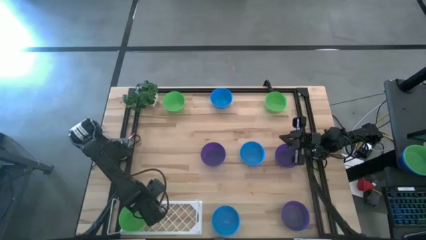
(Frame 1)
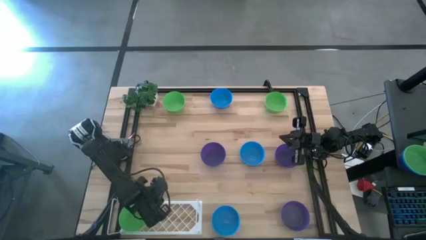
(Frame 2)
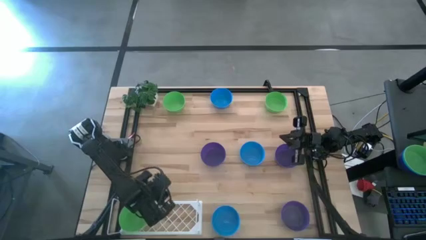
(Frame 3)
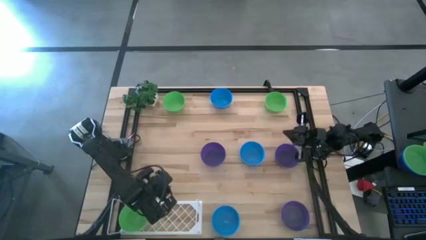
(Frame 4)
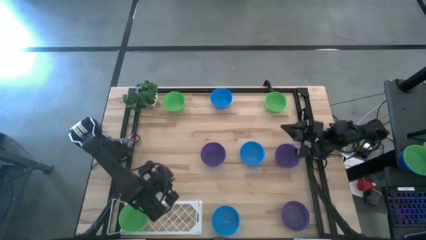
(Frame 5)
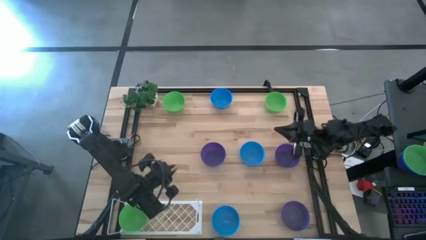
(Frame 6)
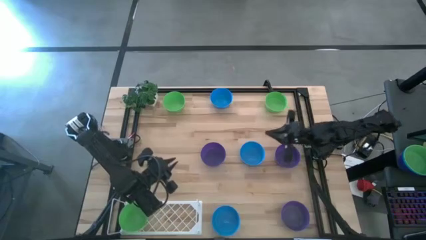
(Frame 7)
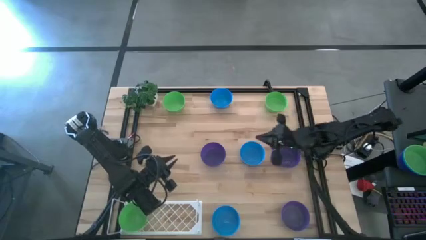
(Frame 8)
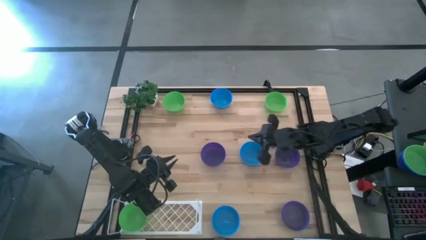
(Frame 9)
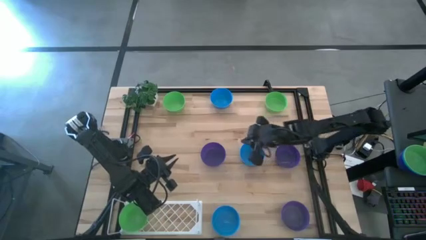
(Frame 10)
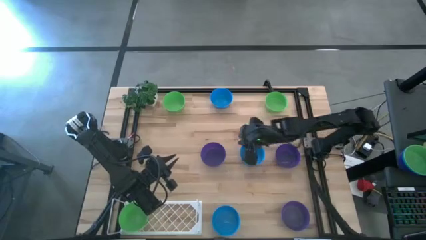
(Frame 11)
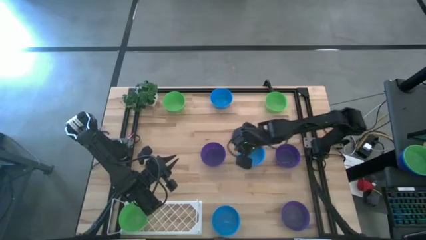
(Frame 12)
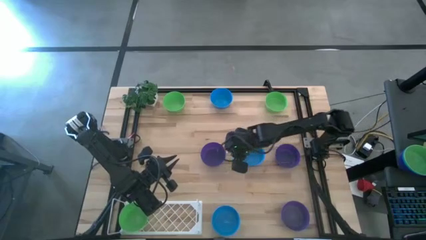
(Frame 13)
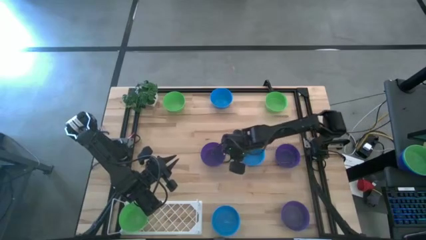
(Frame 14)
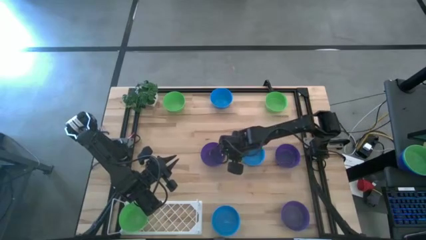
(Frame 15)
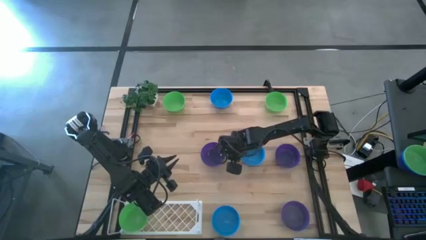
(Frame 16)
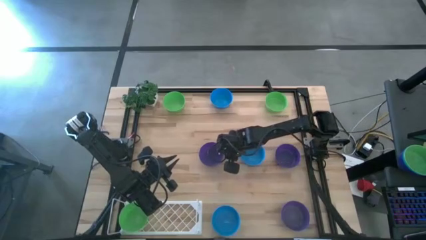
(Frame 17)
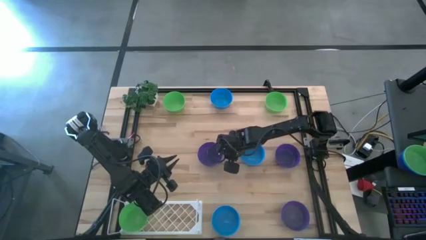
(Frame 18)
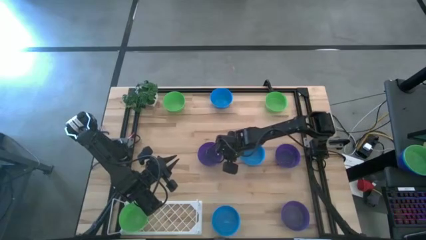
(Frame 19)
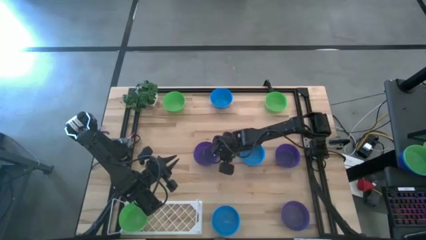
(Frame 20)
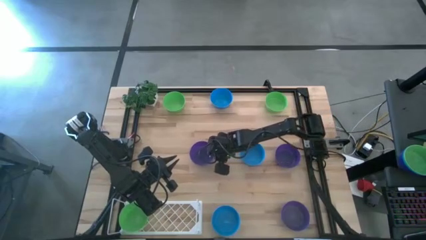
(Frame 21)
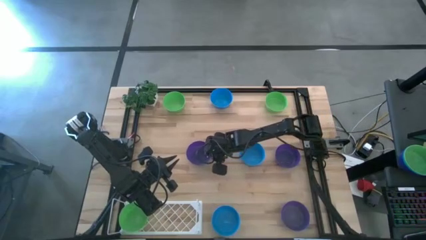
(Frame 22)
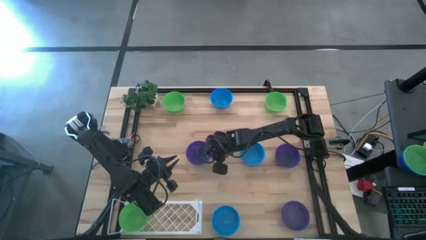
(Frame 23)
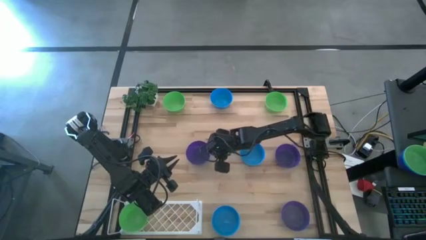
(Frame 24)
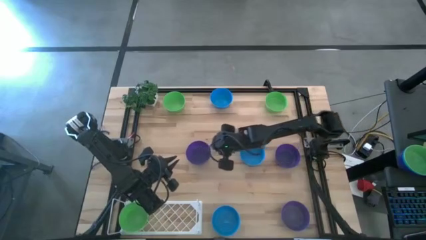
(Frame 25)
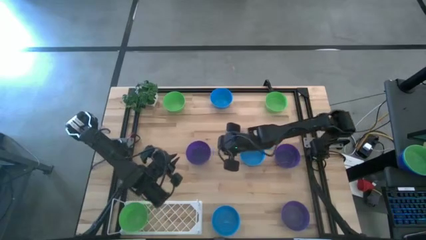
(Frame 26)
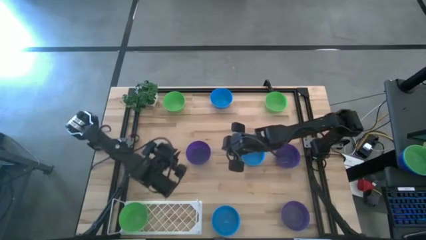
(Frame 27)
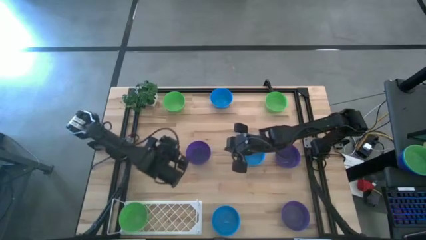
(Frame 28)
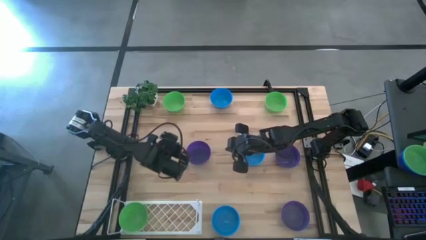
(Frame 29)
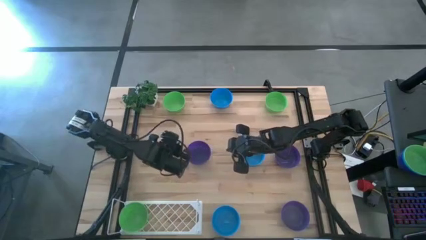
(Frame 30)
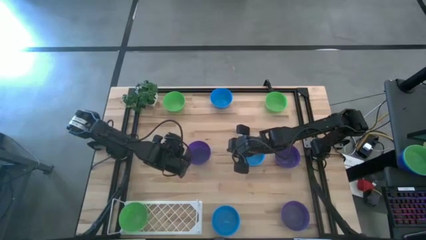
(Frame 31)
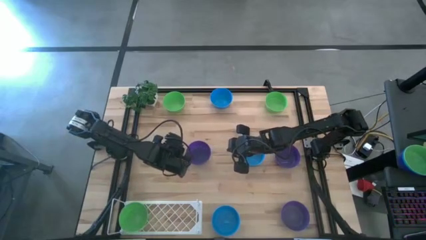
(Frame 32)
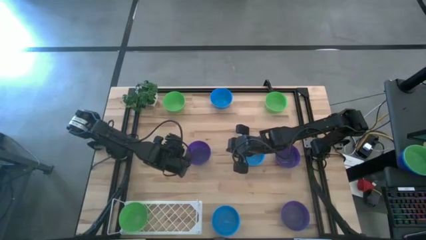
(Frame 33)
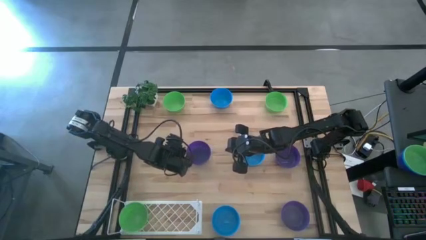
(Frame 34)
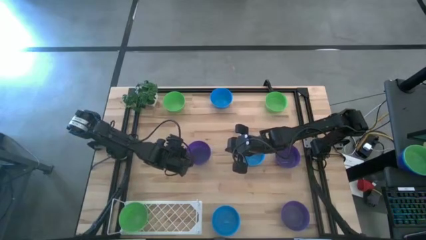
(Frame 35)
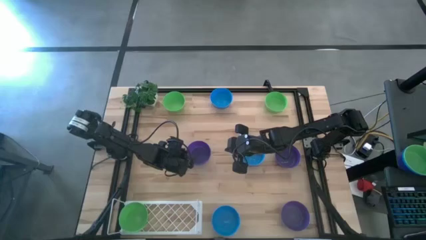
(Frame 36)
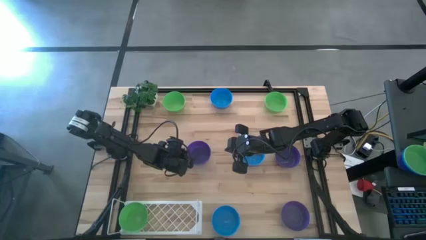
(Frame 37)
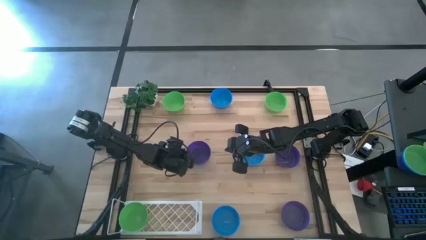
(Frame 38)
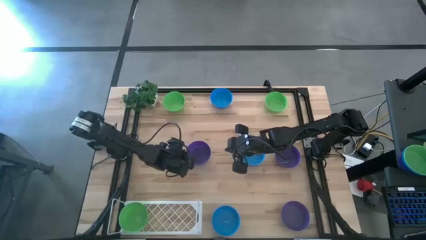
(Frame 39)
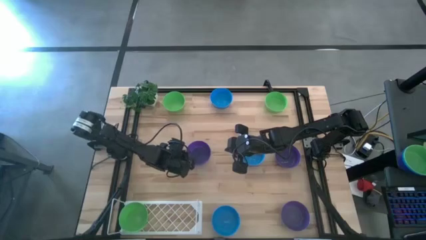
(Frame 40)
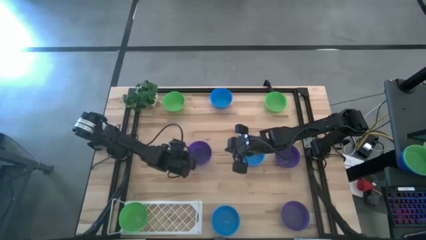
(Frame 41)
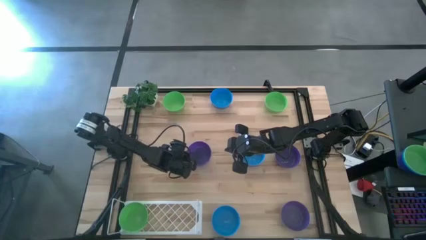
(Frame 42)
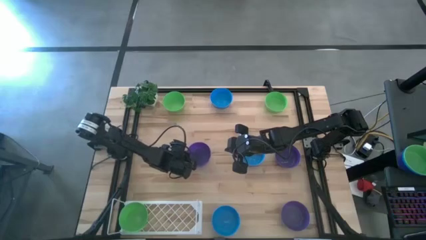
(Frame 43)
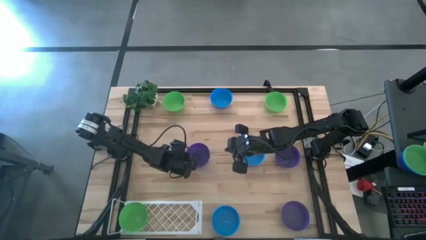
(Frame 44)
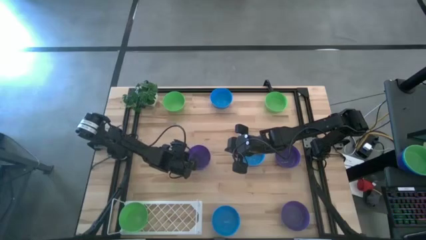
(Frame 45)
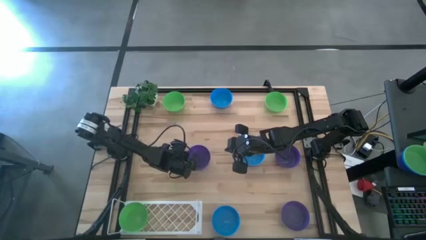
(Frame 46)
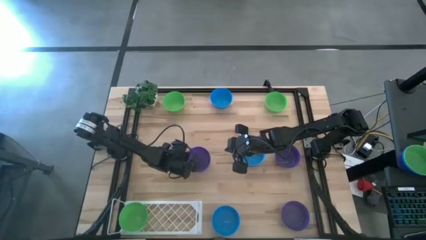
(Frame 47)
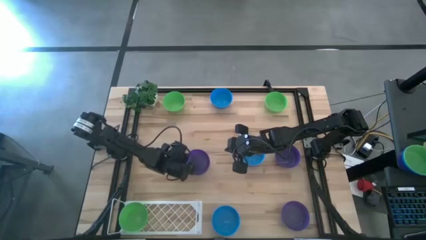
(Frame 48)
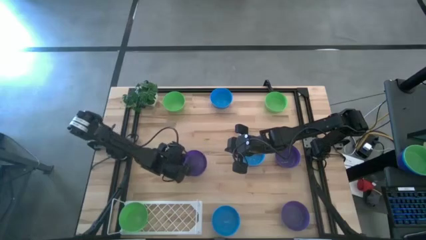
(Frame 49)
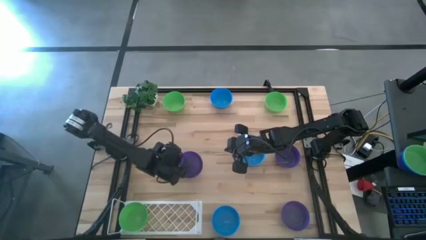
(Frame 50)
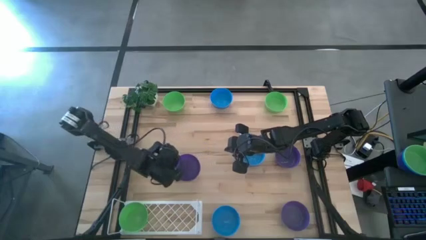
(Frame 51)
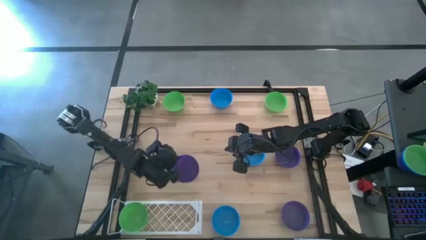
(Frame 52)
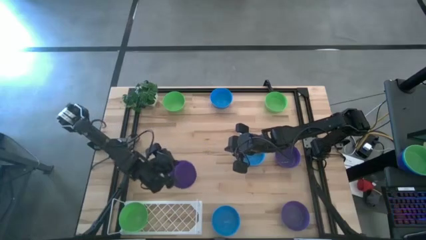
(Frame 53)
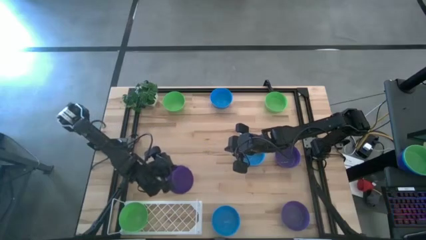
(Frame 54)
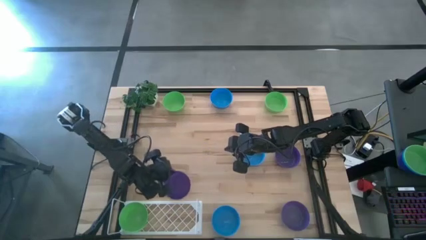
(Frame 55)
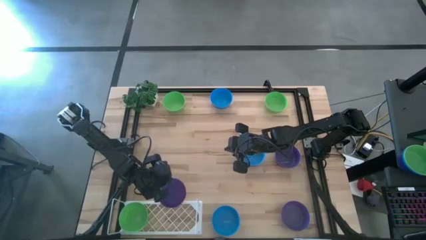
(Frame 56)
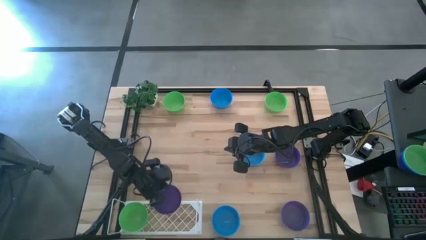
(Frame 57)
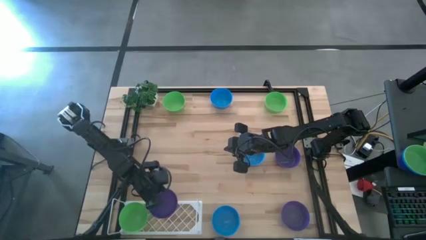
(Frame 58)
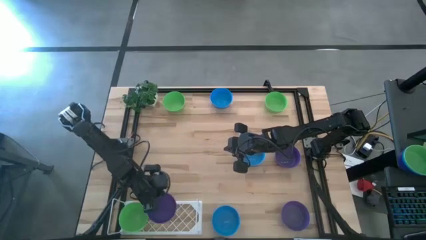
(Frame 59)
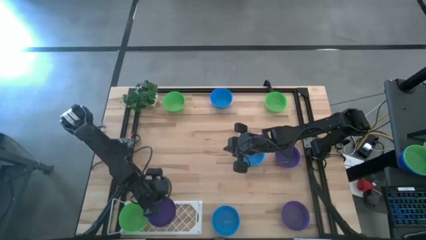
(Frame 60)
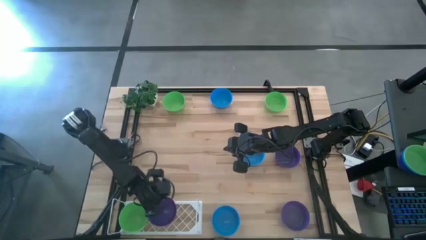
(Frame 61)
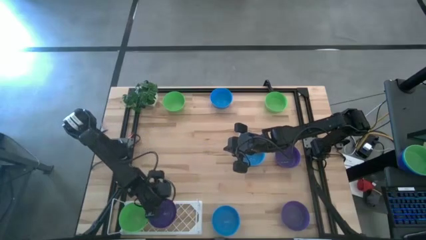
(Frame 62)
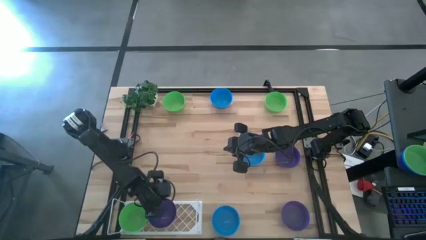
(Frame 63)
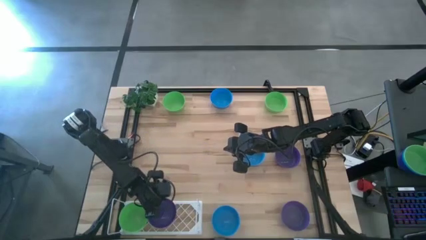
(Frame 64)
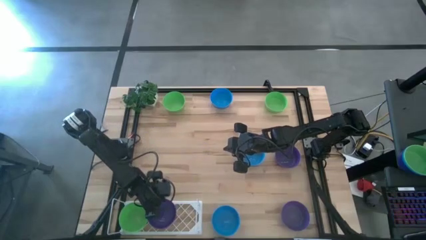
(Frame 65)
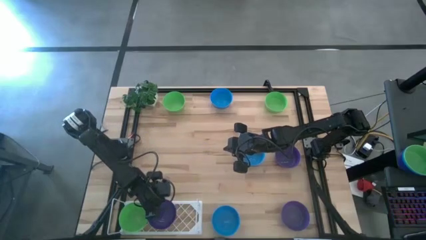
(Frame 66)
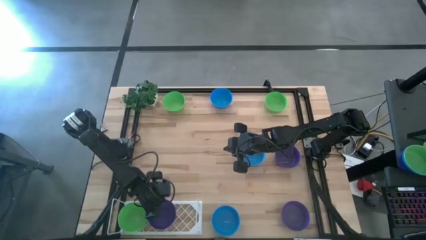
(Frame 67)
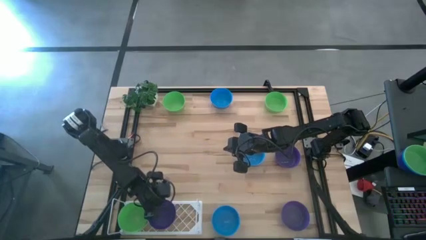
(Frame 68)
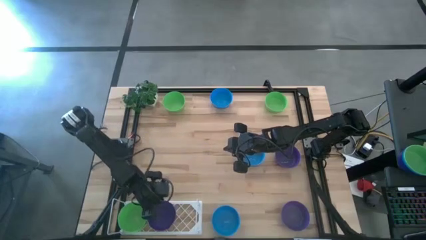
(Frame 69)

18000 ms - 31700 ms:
Task: Pick & Place Mini bowls
Put the top left purple bowl on the shelf
